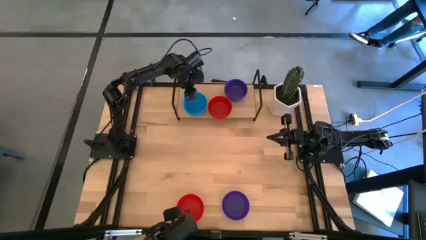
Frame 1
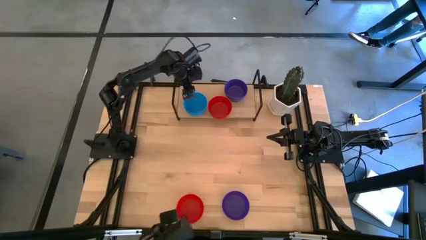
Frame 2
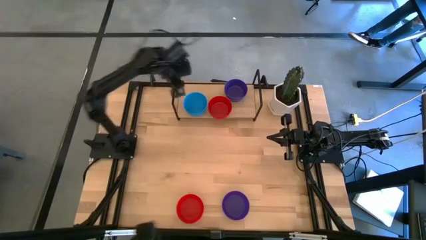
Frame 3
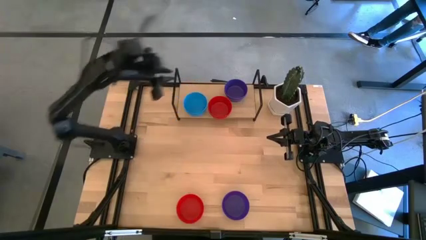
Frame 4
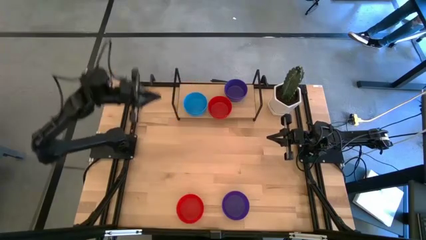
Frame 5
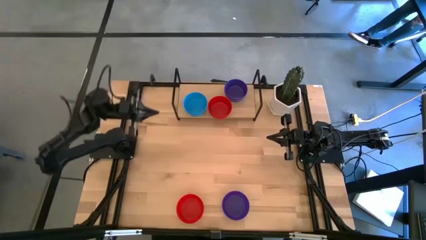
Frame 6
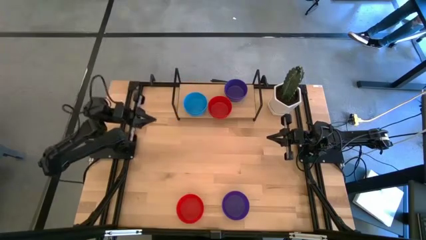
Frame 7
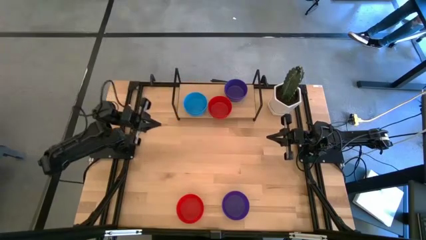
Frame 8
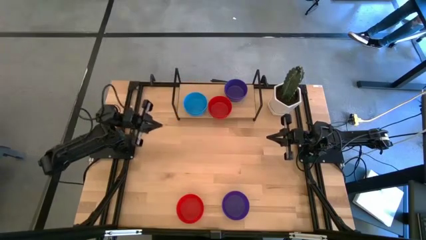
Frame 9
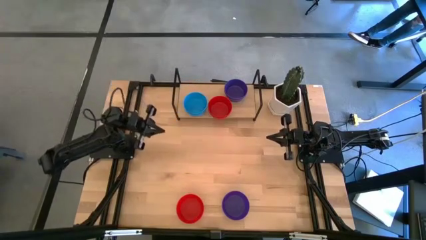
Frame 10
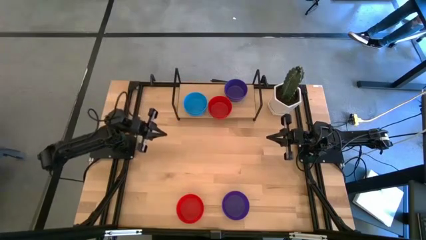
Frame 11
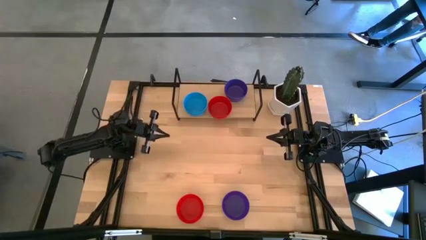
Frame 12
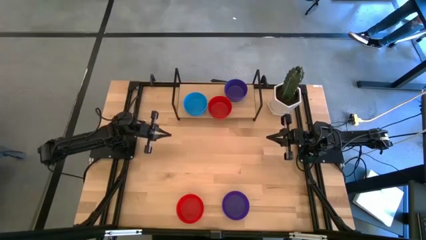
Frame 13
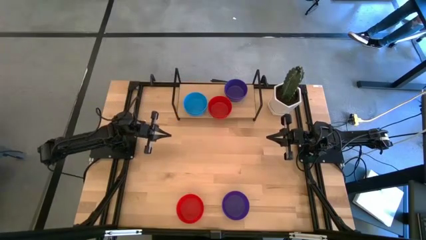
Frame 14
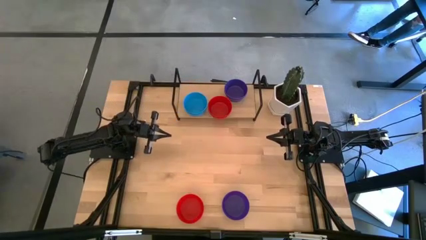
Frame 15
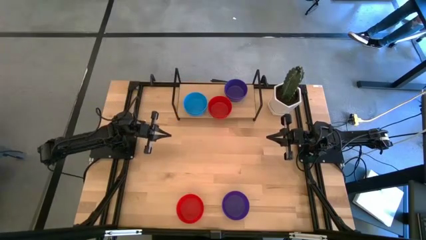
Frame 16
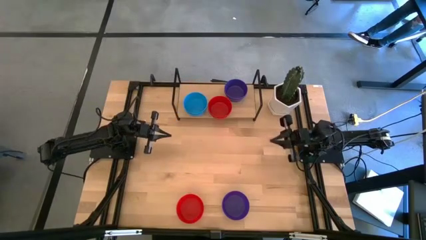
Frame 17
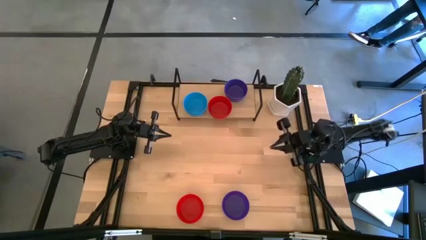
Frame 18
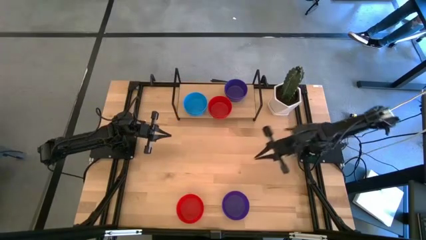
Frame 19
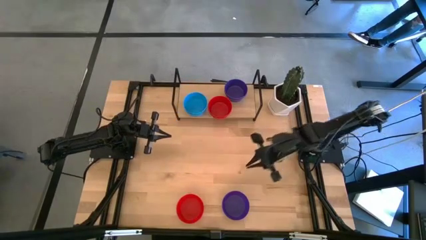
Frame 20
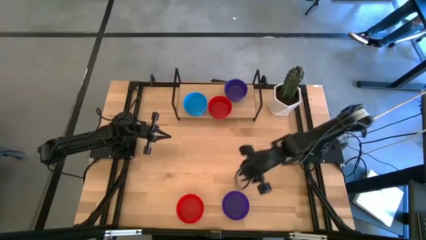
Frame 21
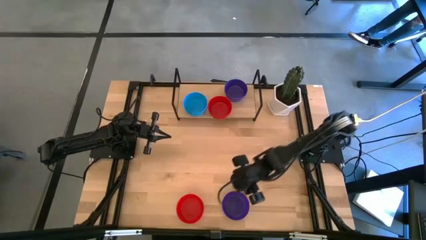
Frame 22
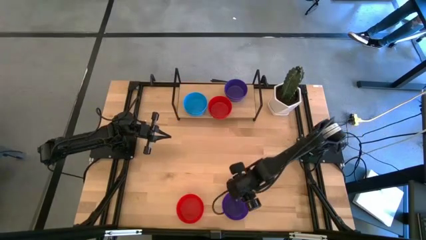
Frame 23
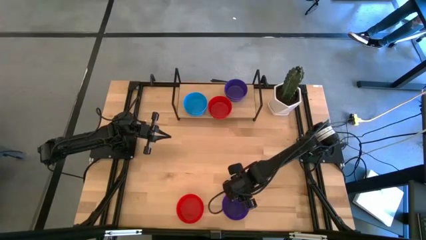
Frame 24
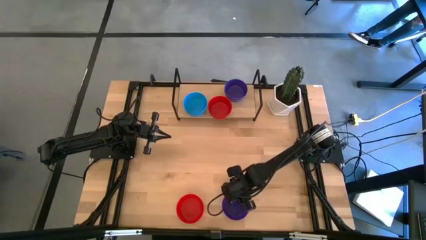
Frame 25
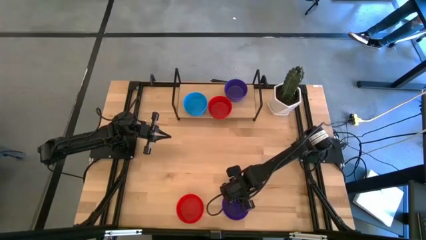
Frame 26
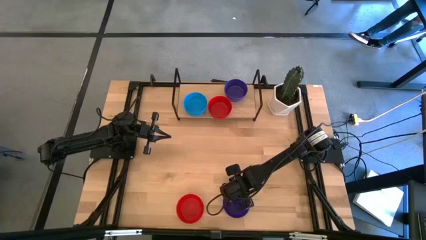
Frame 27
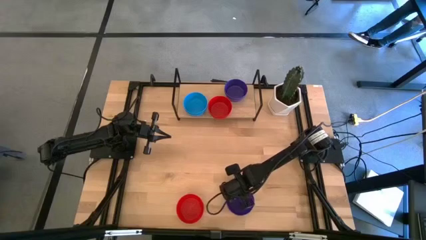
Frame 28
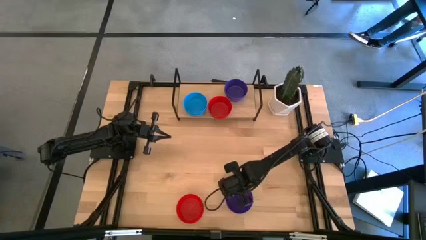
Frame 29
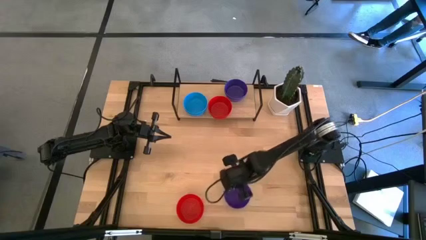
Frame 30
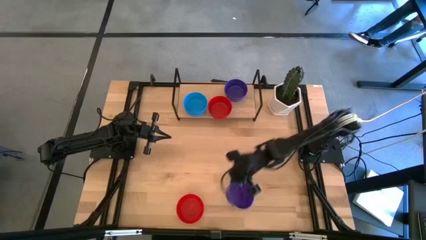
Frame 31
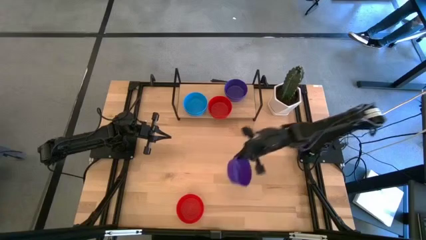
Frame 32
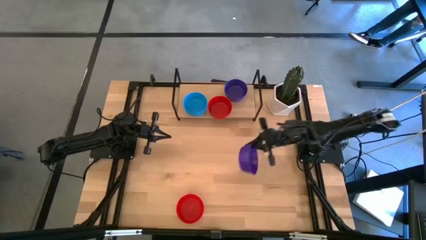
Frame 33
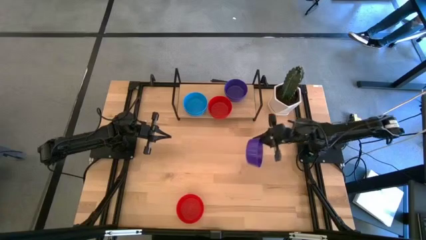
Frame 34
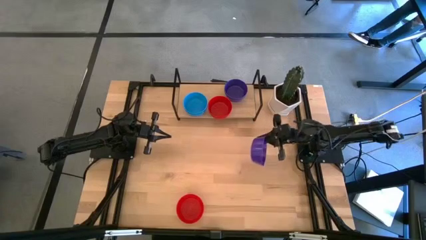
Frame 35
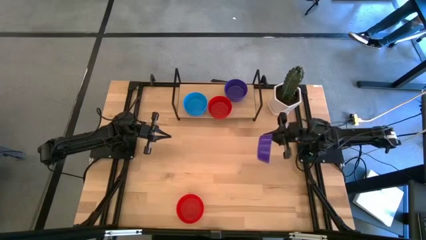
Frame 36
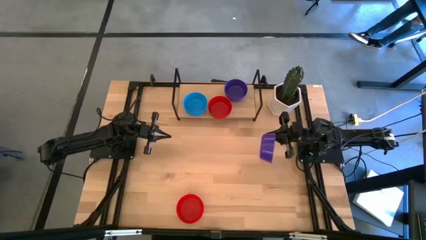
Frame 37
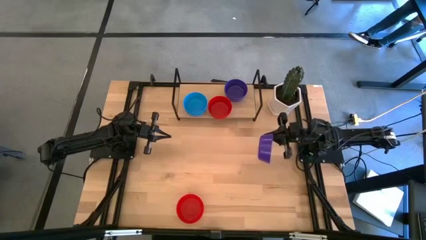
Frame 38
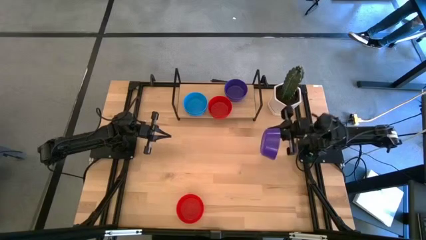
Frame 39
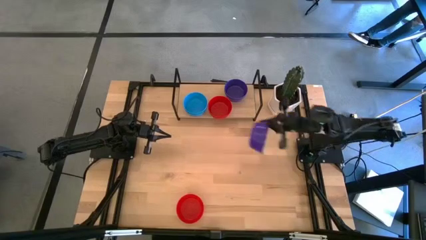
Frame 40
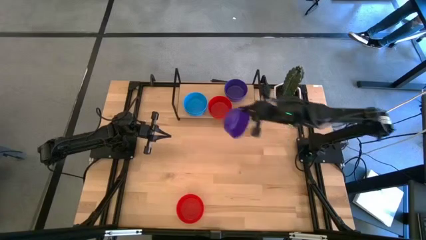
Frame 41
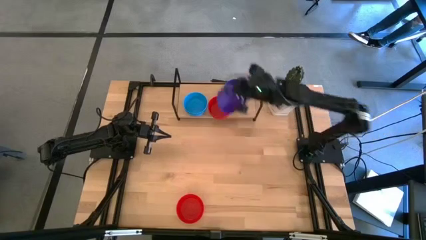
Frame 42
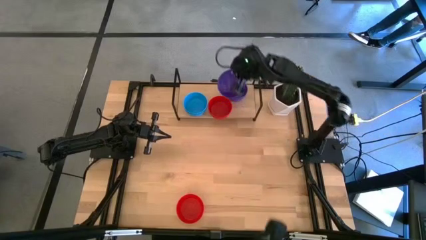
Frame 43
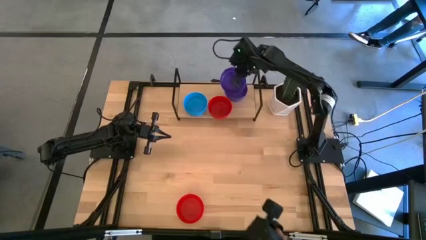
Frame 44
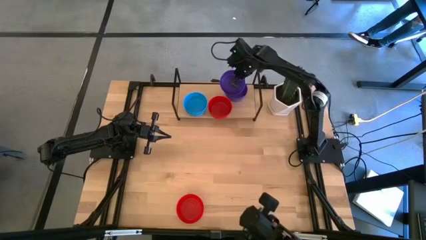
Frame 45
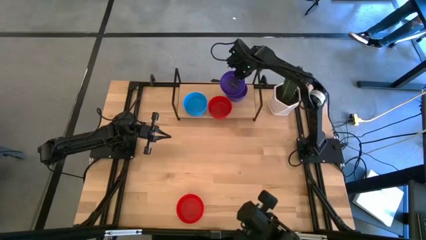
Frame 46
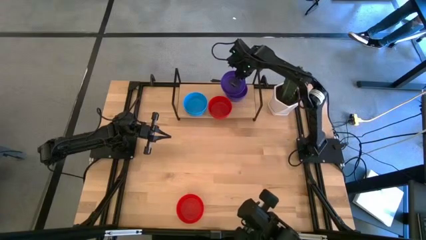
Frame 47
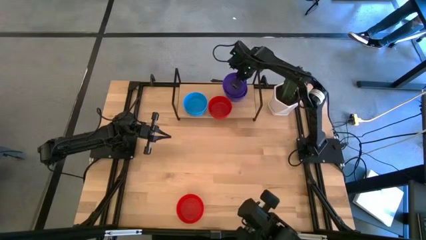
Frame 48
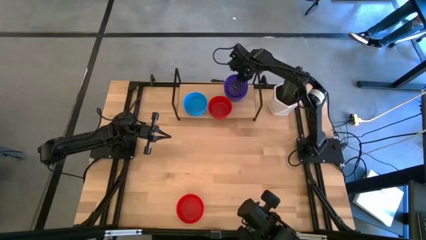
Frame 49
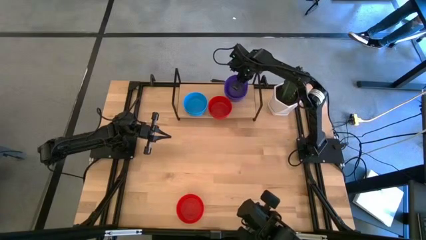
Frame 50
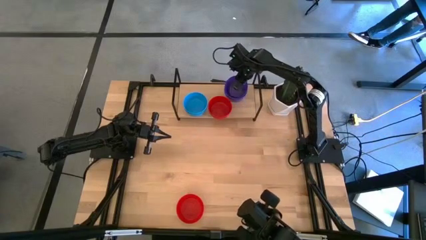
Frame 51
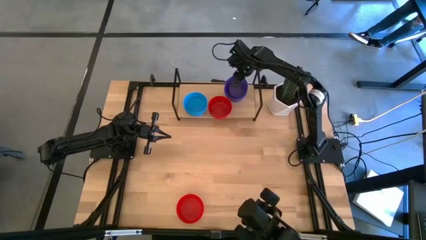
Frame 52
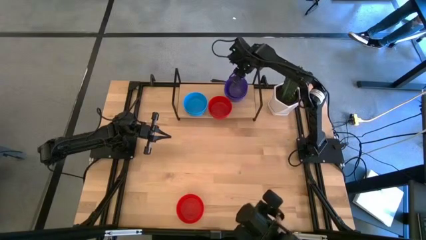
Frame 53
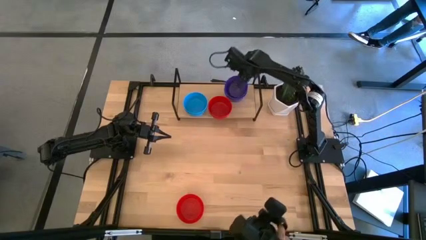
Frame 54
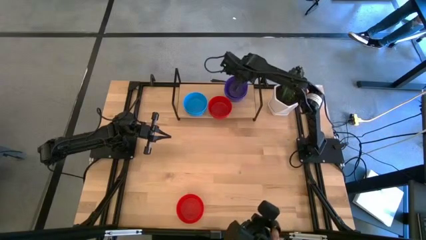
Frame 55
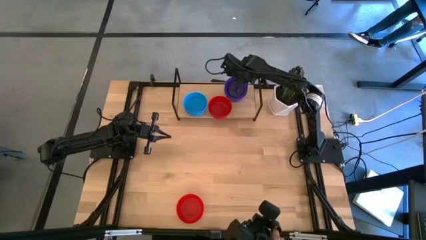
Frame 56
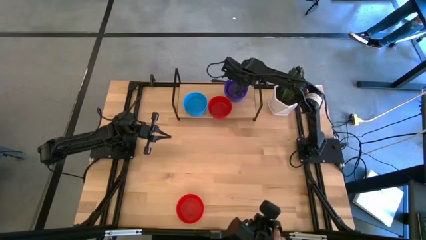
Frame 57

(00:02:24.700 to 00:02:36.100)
Task: Pick & Place Mini bowls
Stack the purple bowl on the purple bowl on the shelf
